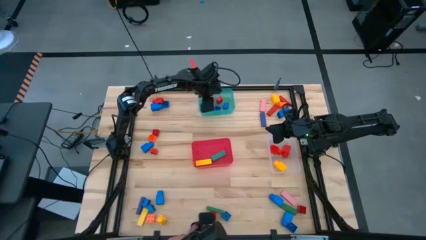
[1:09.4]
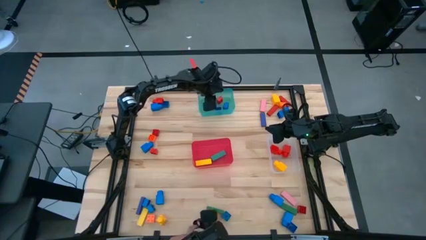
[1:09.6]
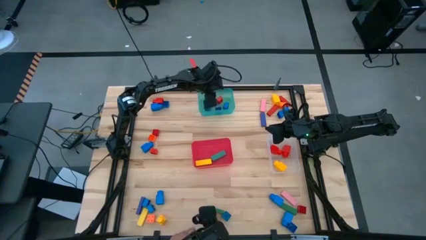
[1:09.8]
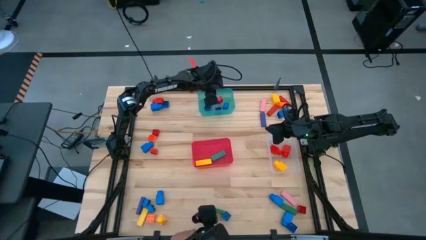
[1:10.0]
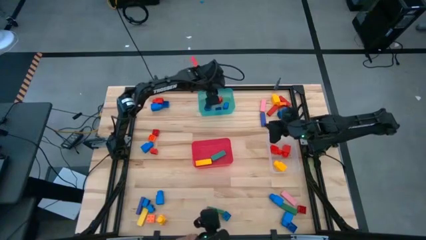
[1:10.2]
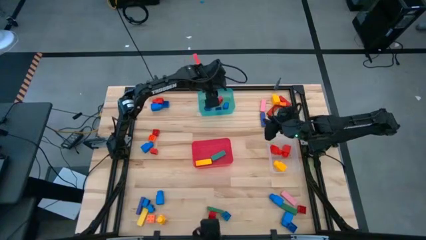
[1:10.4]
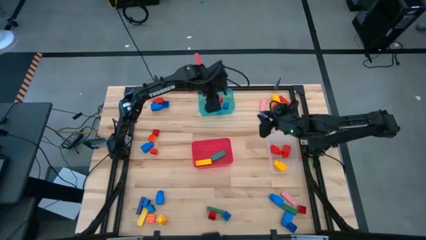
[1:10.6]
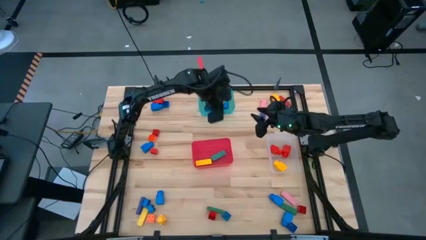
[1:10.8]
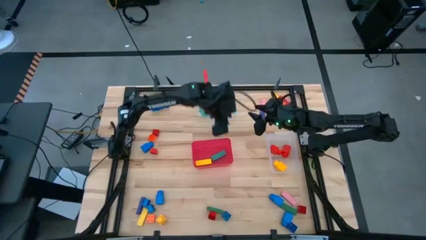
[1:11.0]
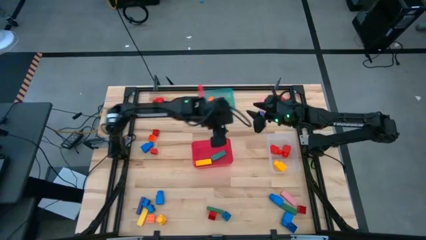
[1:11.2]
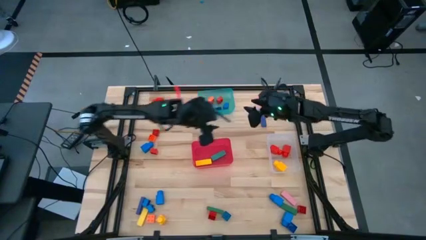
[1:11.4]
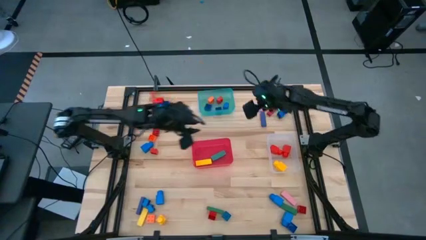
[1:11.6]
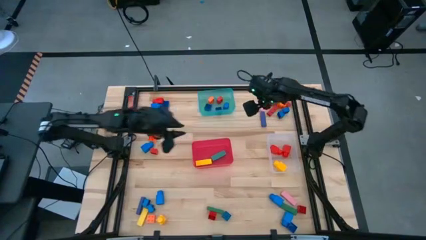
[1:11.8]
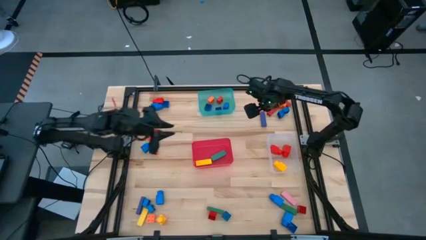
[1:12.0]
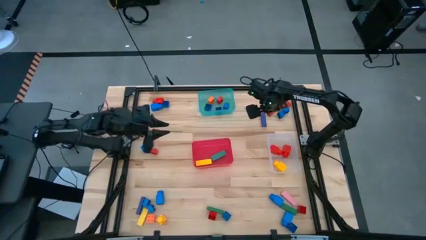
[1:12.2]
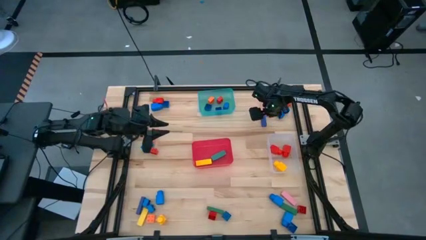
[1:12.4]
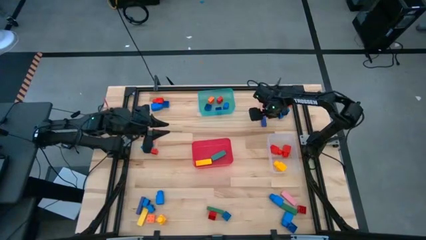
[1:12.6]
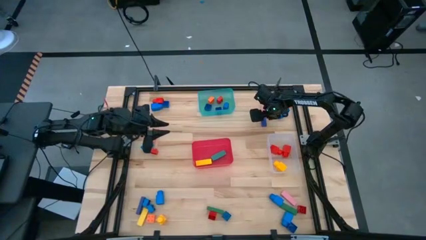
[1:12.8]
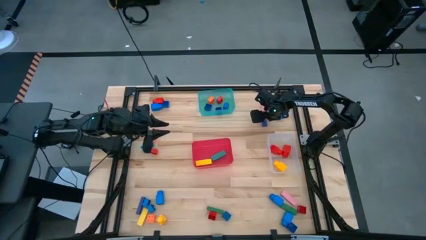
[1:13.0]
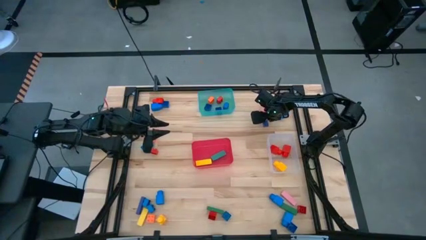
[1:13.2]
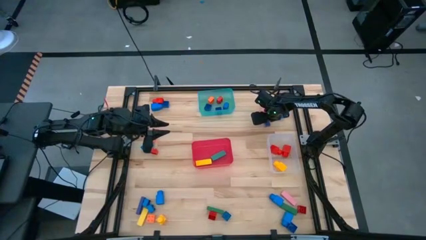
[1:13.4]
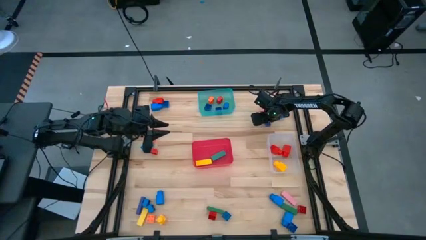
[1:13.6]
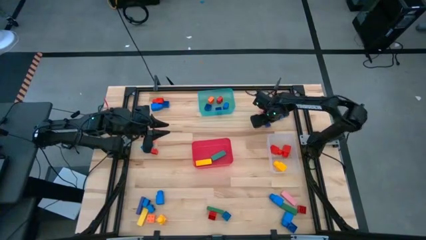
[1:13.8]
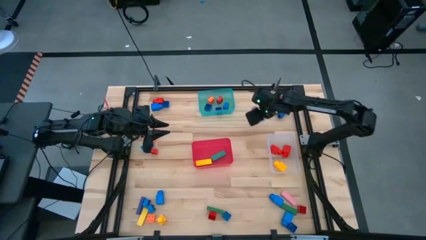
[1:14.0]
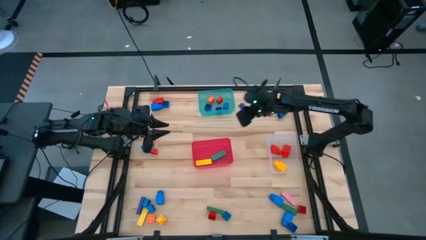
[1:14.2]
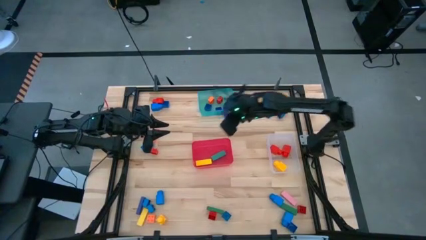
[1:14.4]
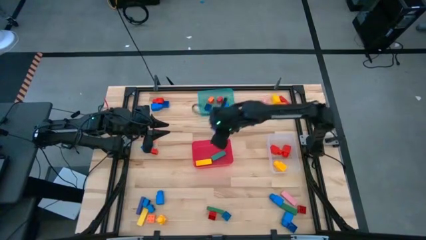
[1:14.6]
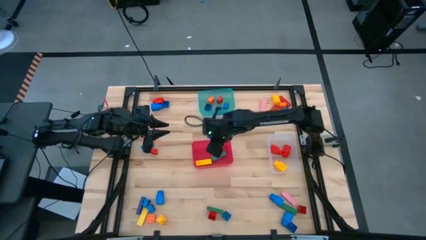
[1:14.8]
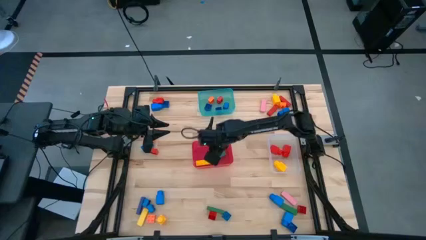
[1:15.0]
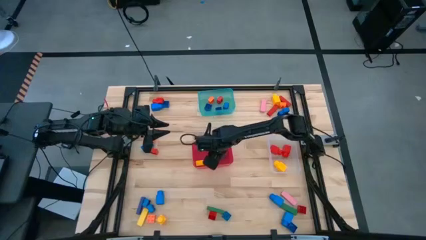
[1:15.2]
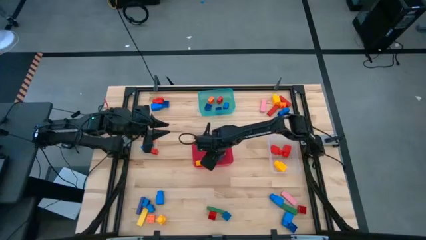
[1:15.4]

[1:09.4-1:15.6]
Task: Sort blocks by size
Put the blue block into the bin

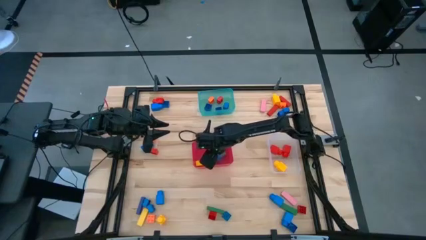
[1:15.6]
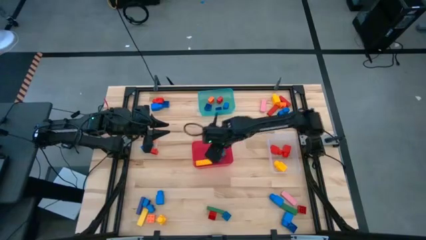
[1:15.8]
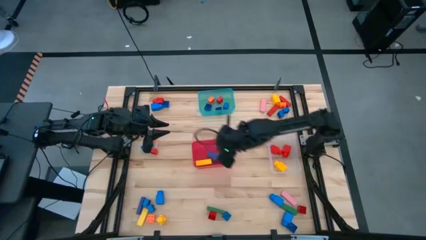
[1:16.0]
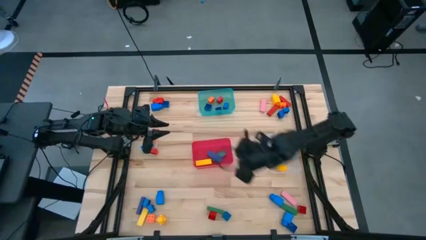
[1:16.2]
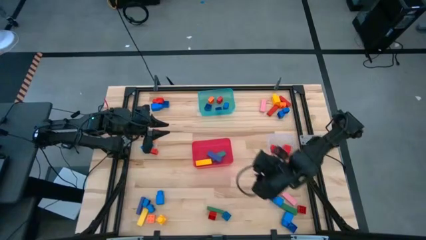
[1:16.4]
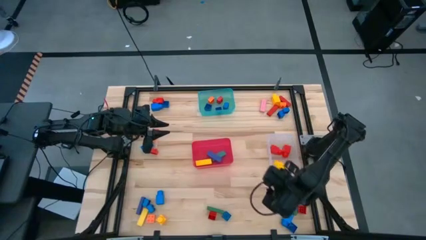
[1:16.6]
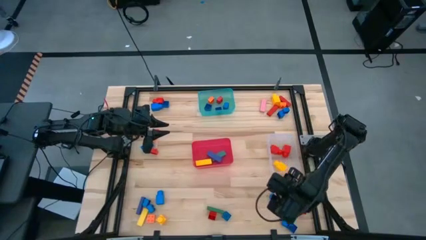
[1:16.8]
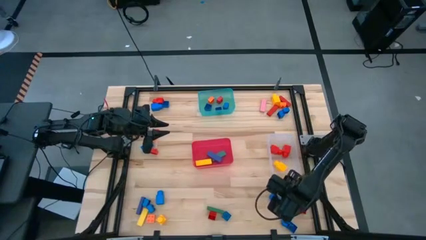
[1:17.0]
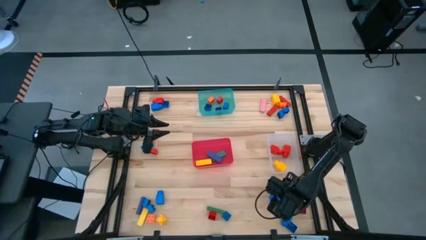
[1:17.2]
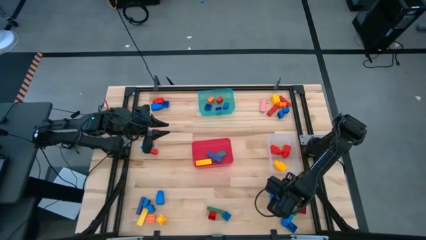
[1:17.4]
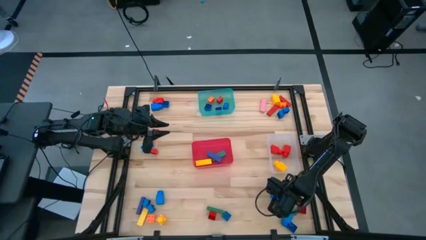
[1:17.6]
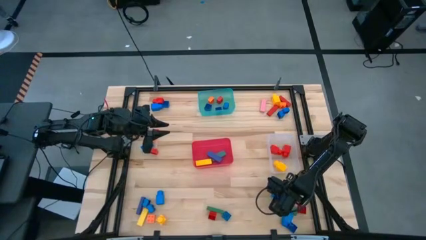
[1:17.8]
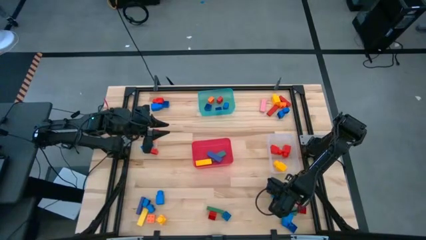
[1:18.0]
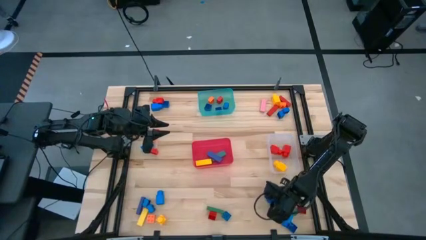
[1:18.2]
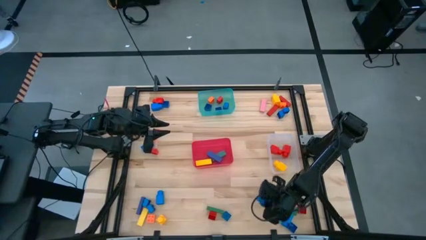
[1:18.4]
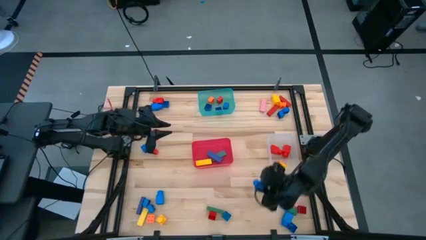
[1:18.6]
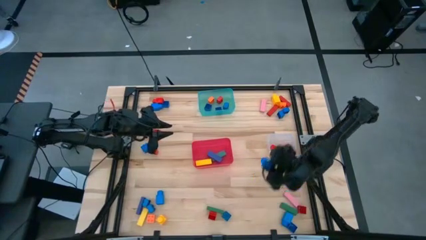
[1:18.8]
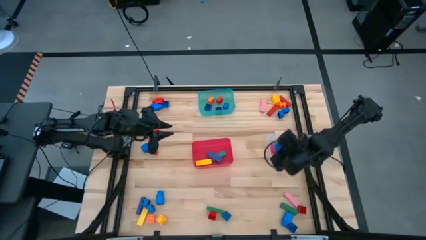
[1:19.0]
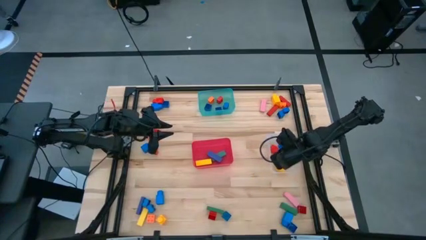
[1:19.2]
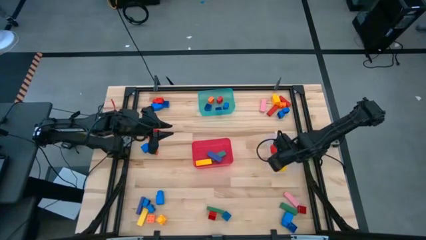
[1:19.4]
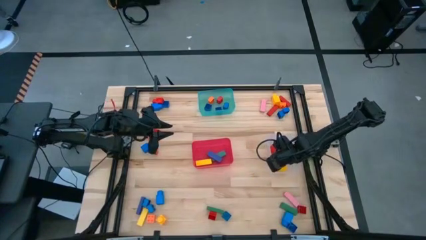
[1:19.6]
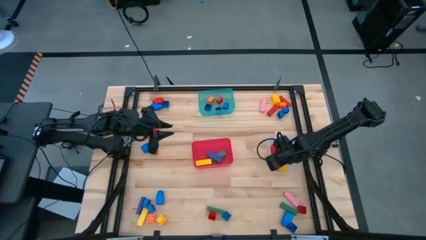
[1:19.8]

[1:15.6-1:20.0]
Put the blue 1 stud game piece into the transparent bin

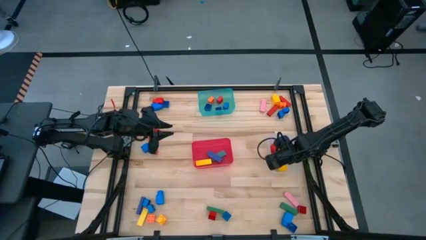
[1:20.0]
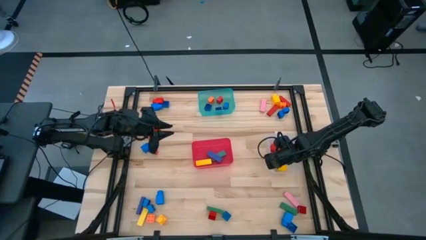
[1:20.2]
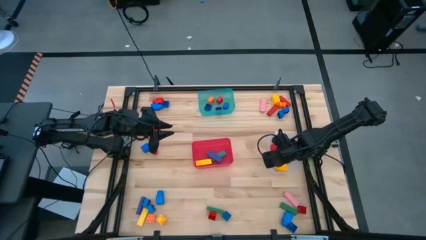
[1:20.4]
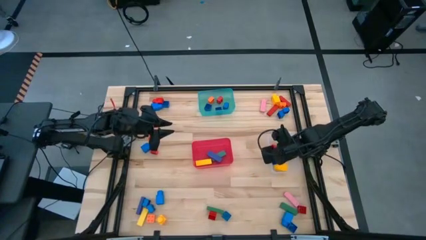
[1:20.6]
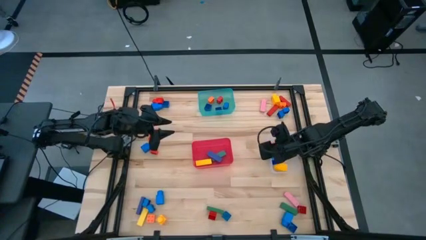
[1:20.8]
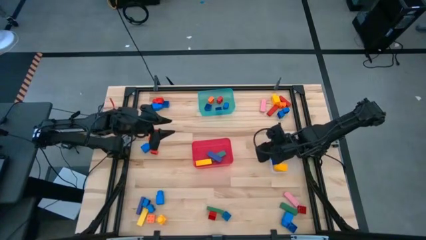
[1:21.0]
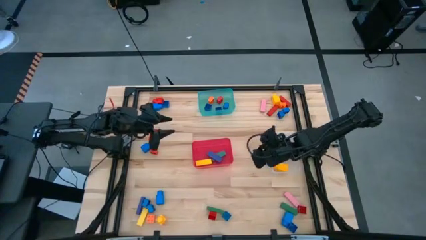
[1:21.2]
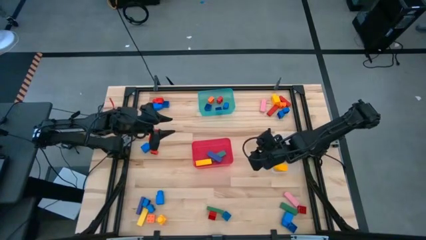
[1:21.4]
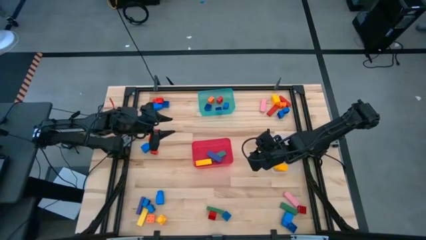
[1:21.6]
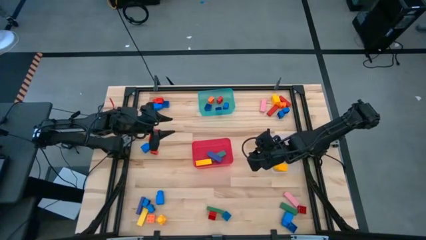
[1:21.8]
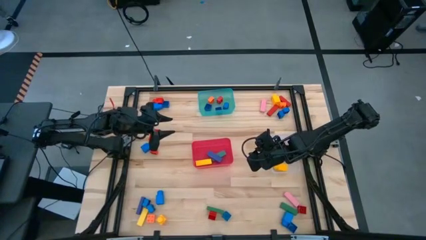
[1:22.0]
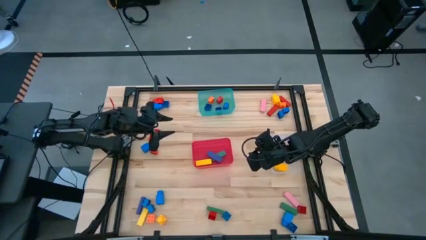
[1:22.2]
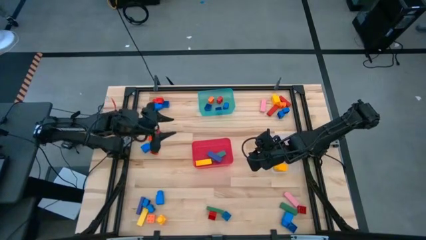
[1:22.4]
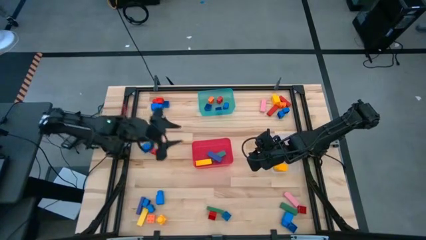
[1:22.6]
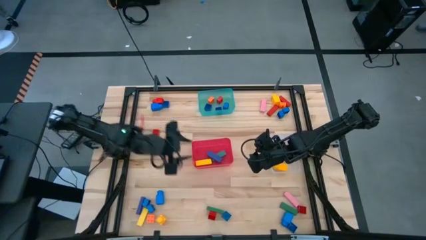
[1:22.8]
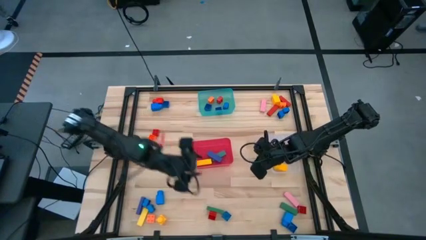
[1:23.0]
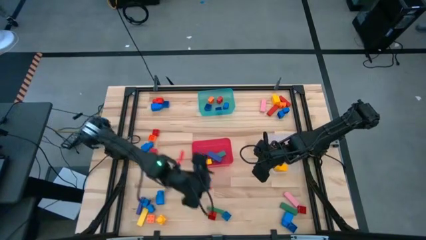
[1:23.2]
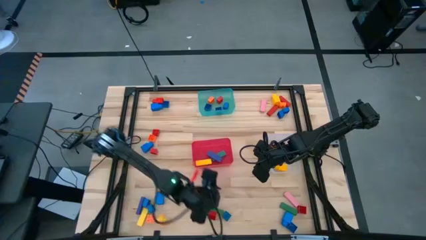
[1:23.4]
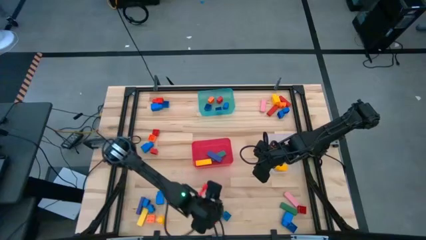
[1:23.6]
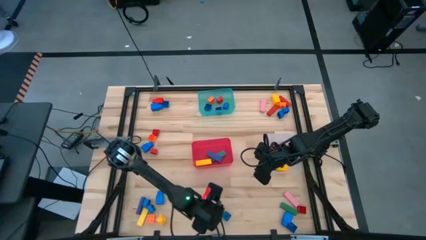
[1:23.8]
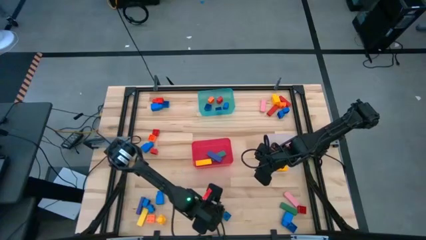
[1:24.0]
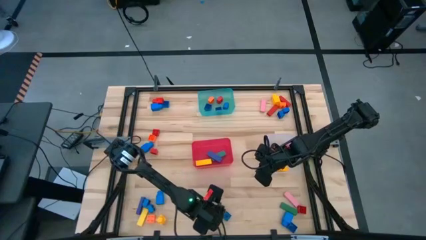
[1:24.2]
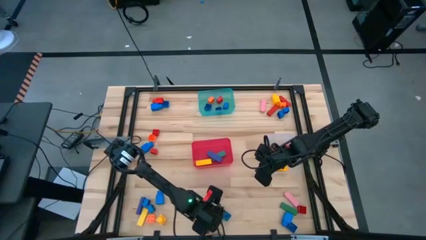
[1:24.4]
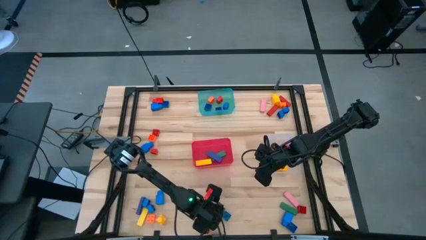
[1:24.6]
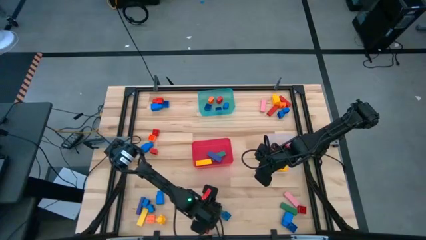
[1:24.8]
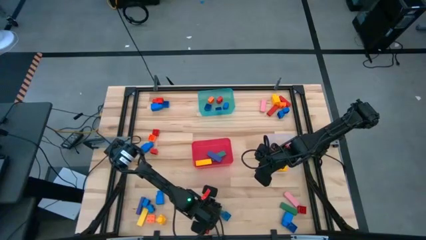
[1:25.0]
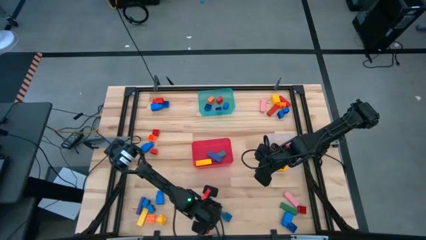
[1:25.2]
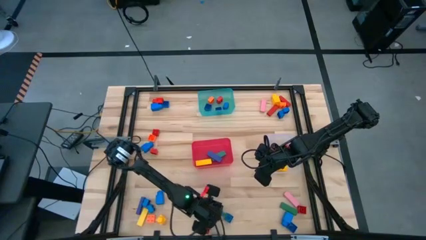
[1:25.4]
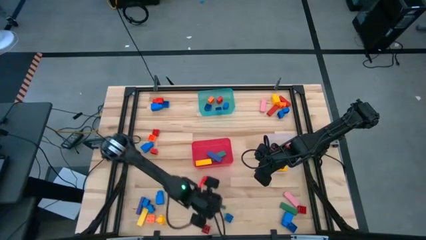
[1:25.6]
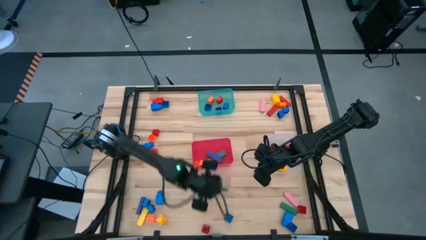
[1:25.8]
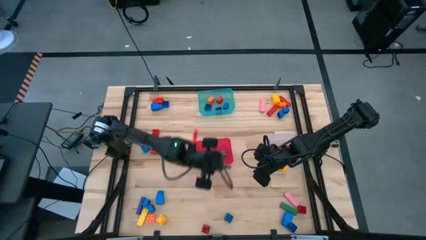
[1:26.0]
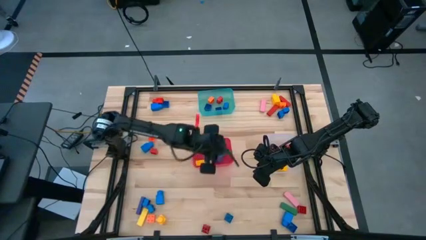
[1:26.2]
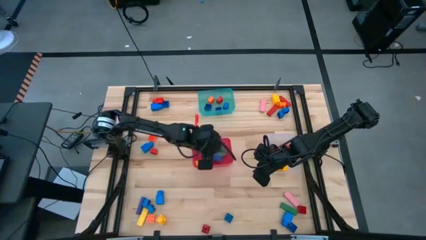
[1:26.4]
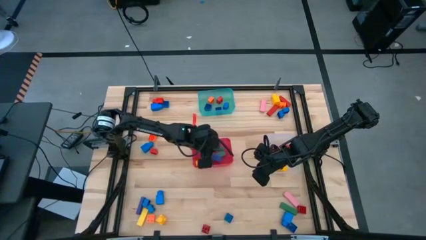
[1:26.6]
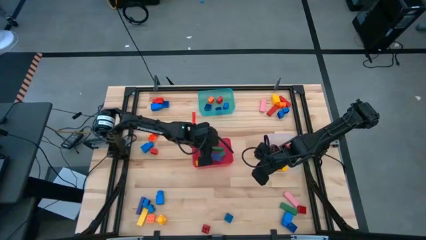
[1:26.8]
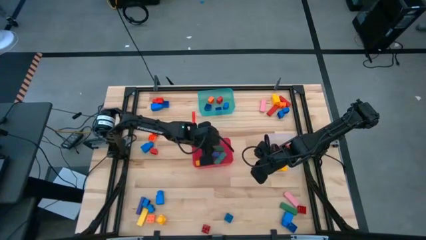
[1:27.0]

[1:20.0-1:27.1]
Put the green block into the red bin
